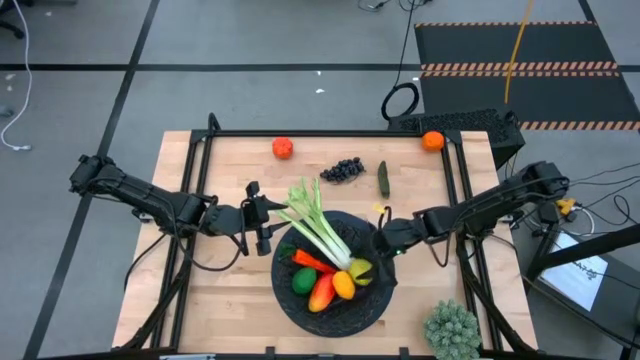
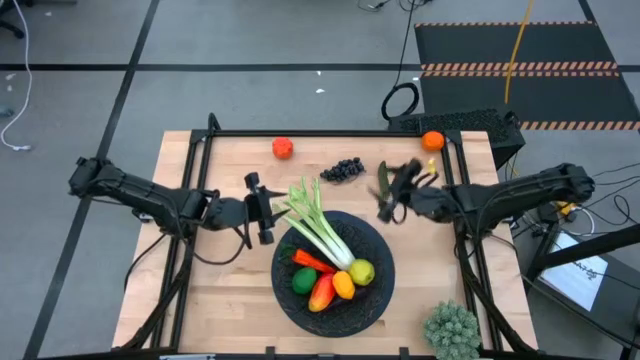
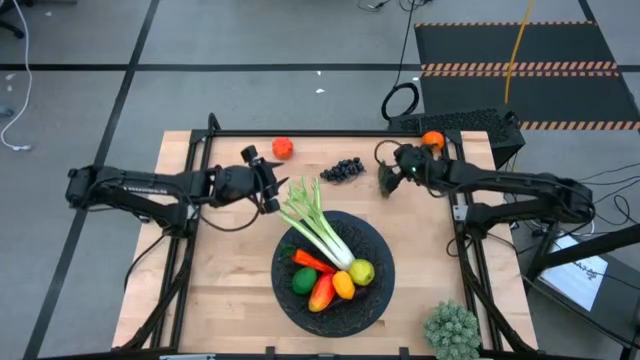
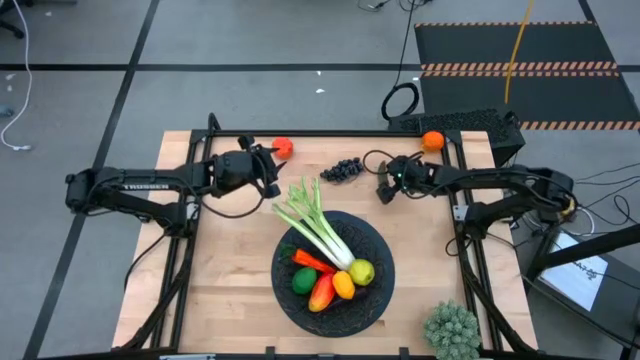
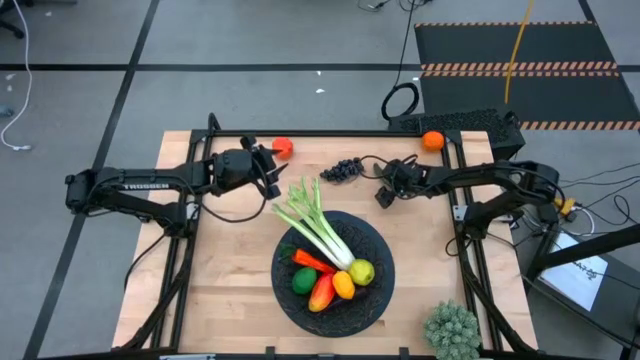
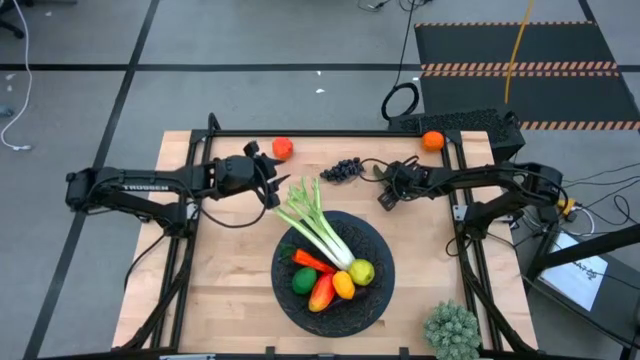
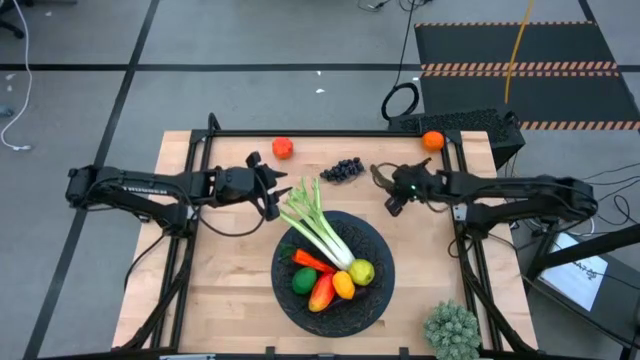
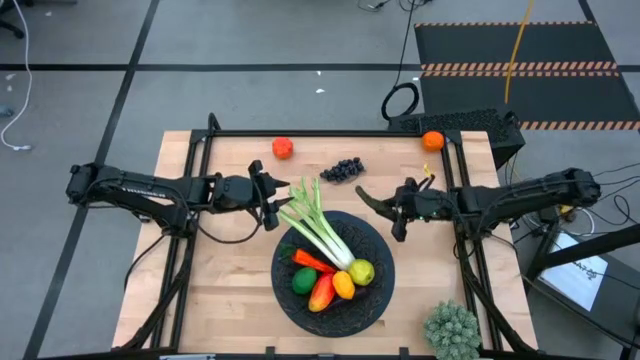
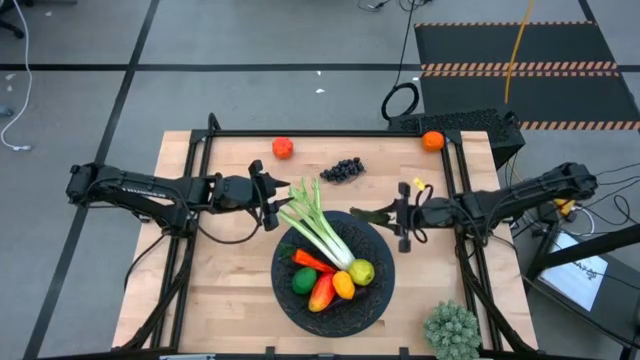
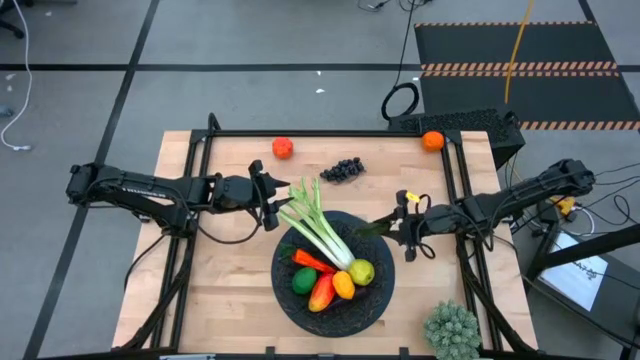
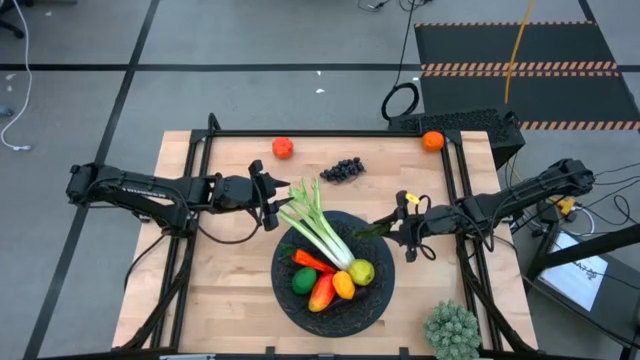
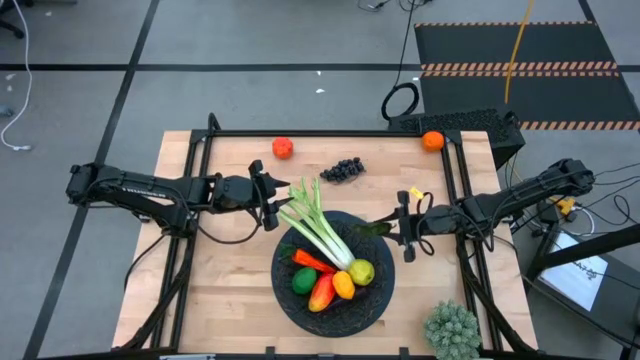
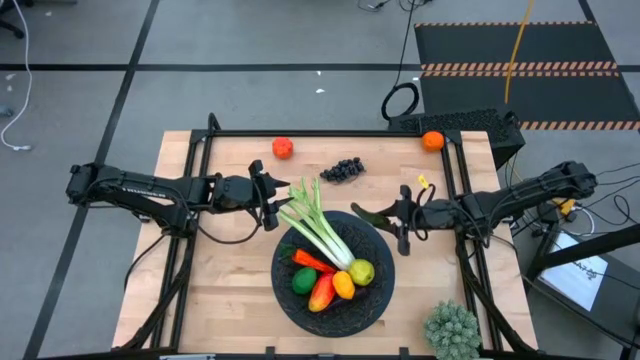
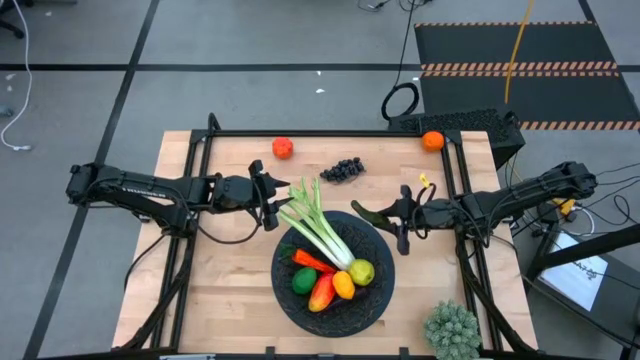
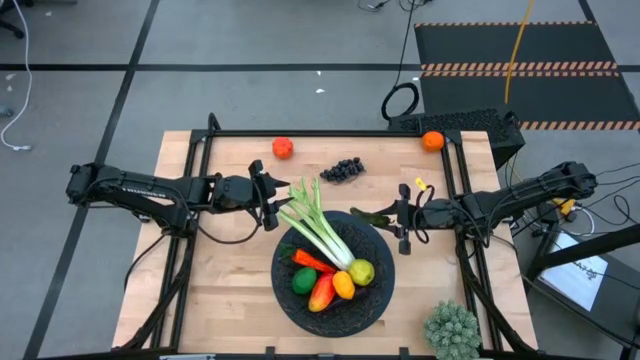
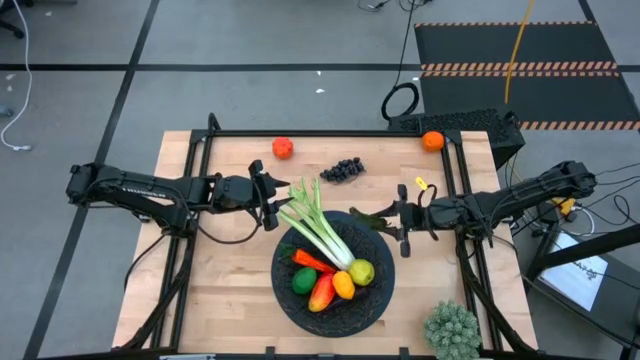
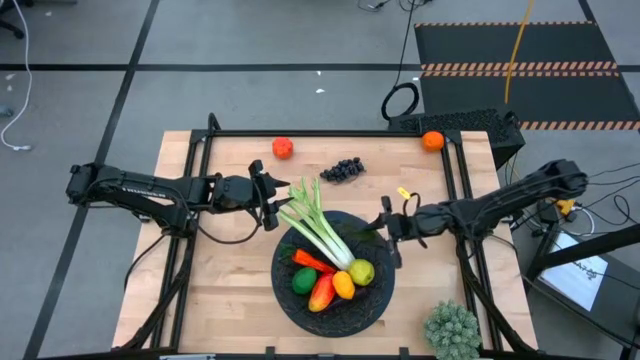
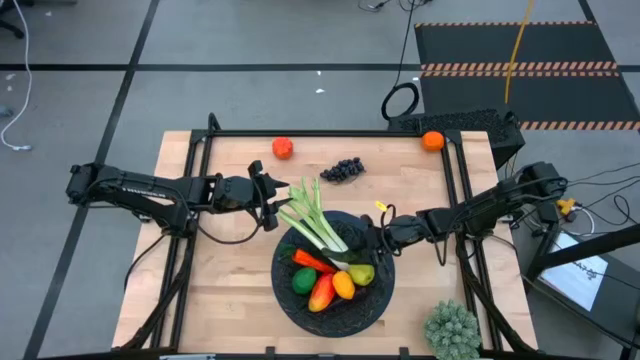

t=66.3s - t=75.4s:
Task: Build produce basket
Put the green chili pepper into the black mesh basket

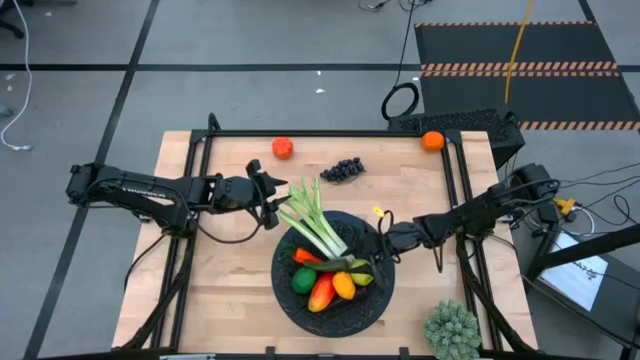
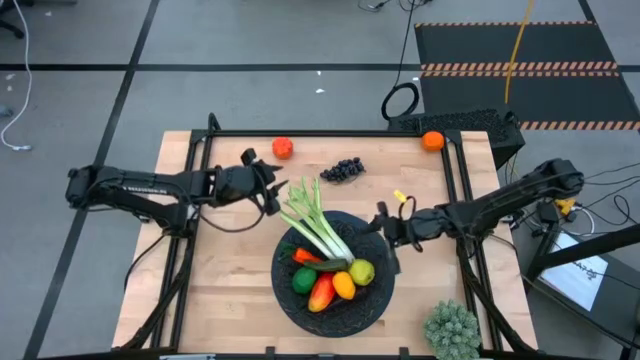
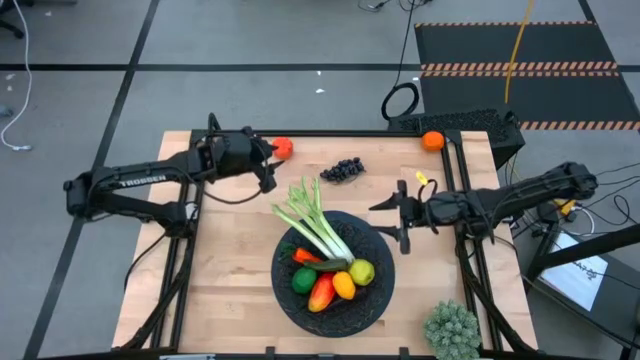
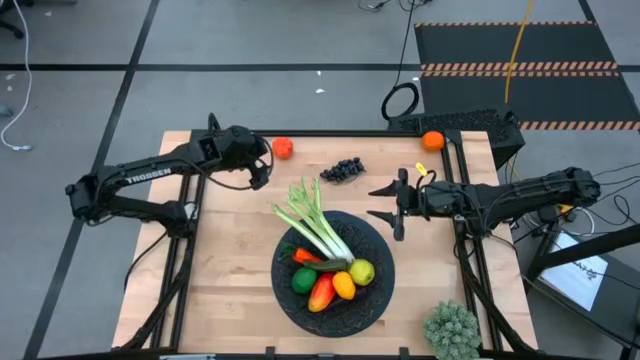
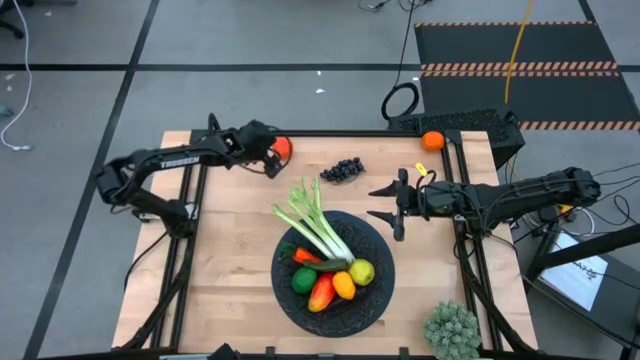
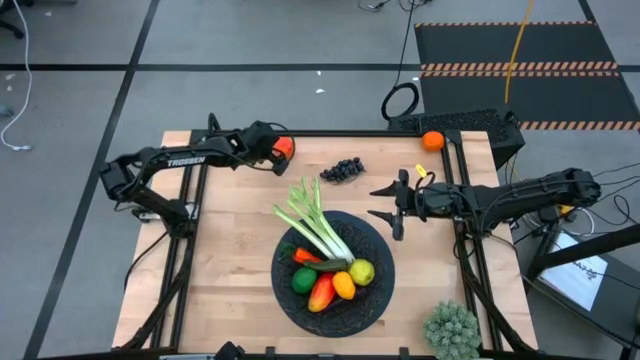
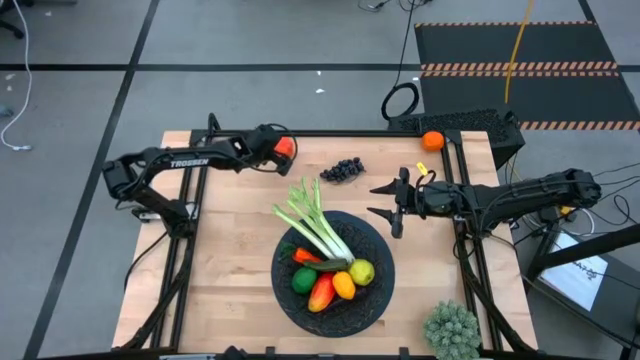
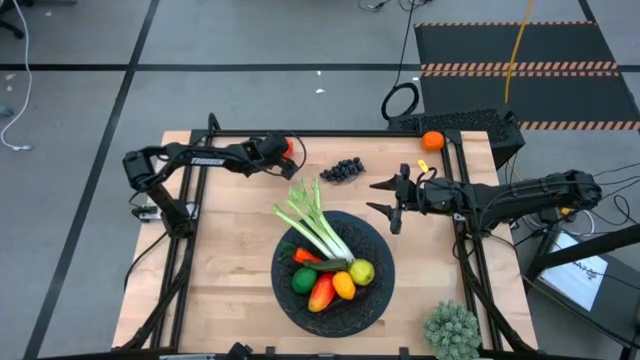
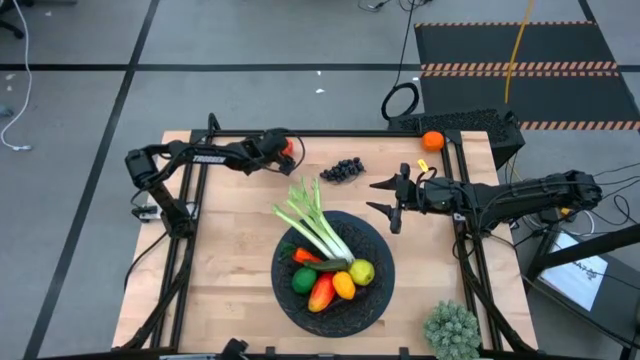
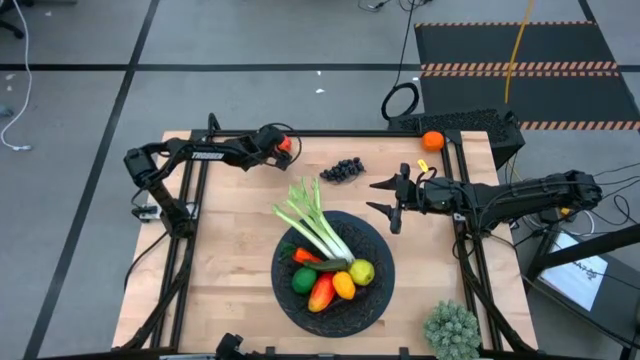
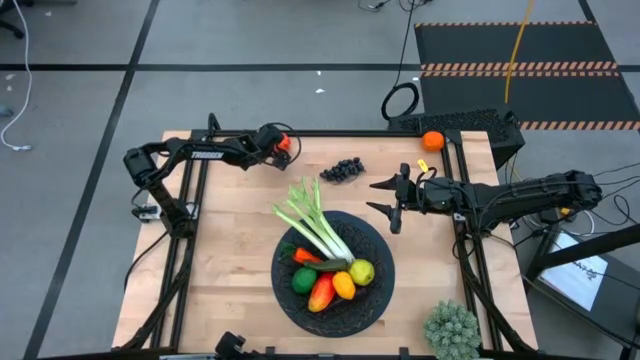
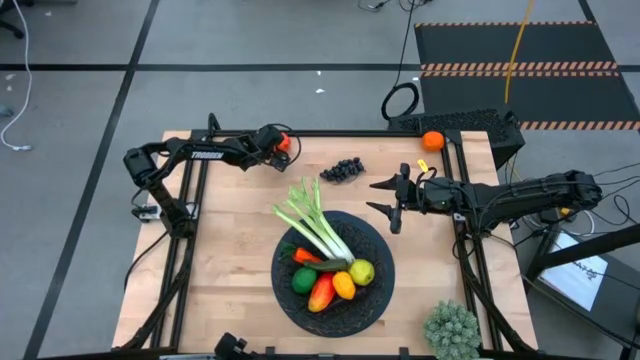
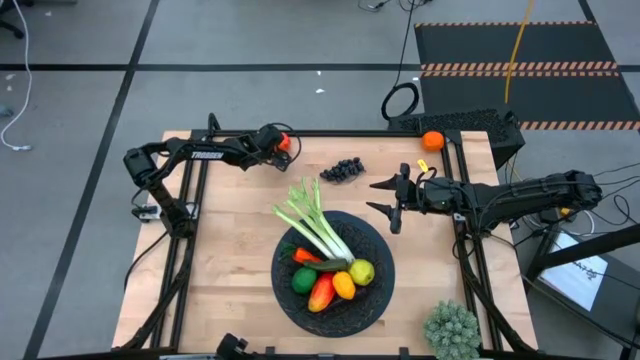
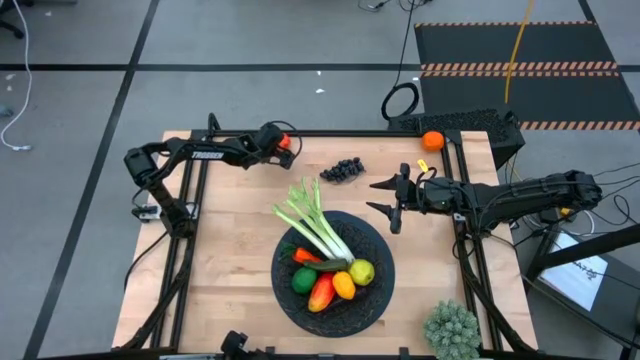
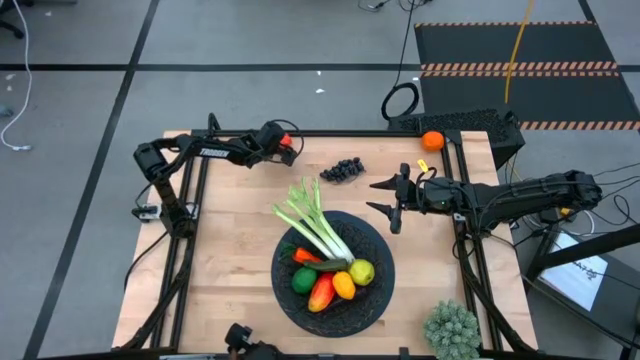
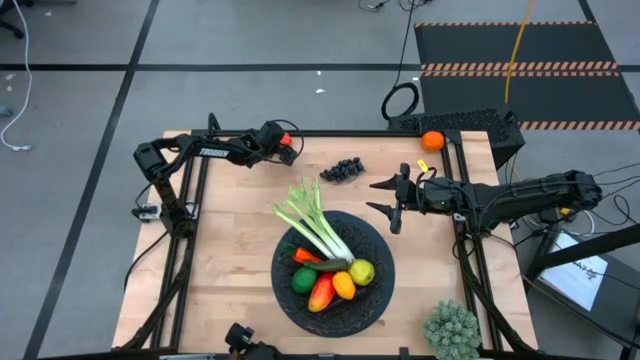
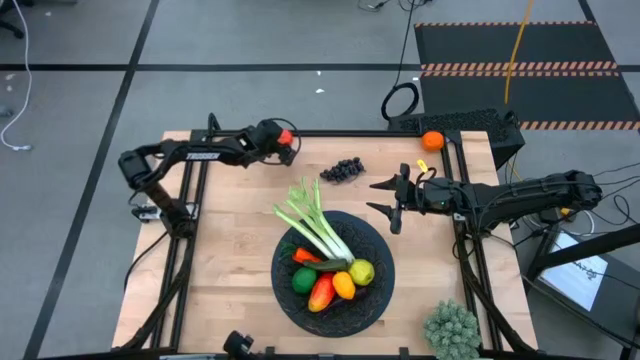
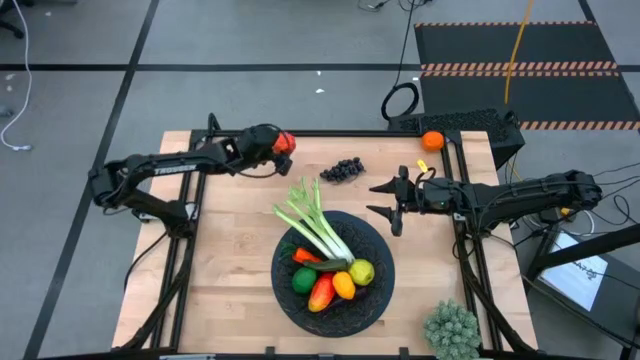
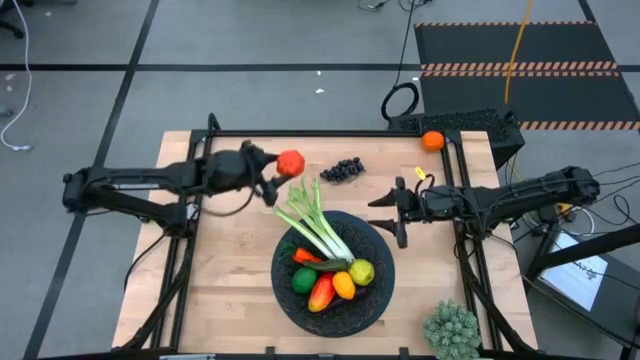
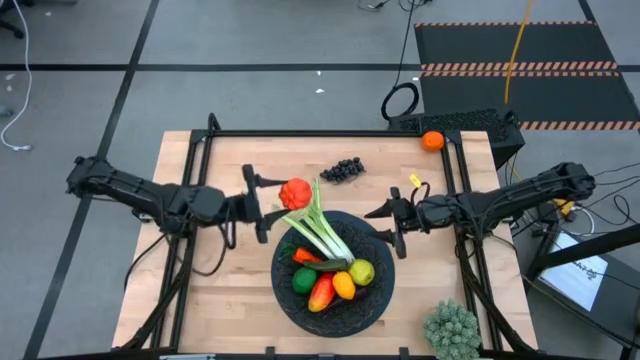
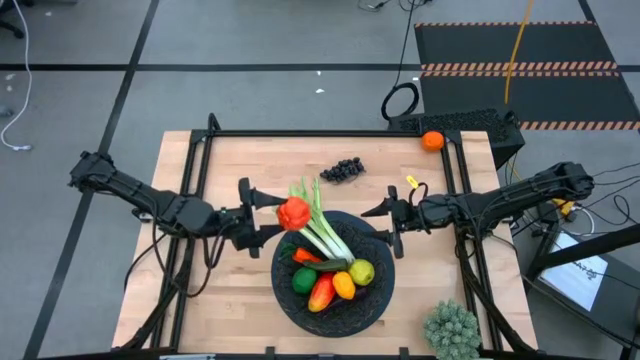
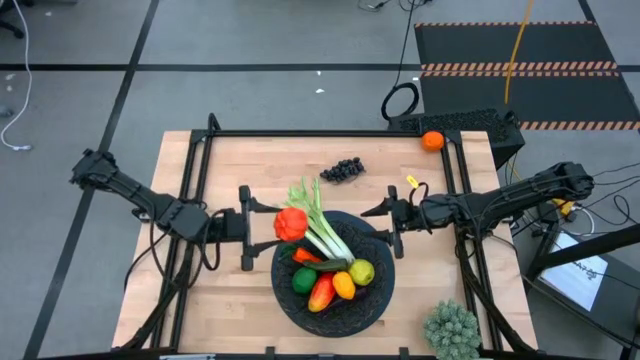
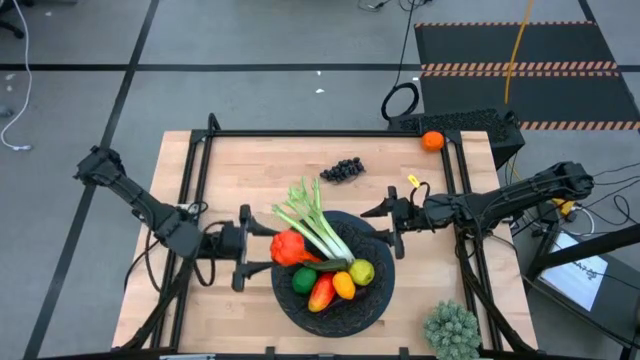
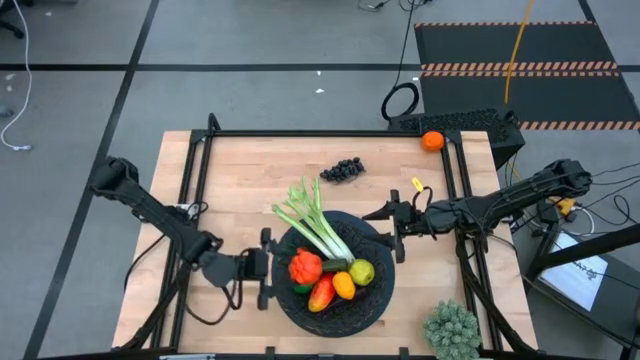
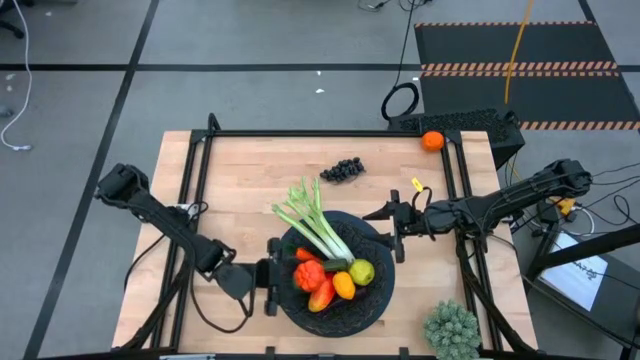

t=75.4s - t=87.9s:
Put the orange pumpkin into the black mesh basket
